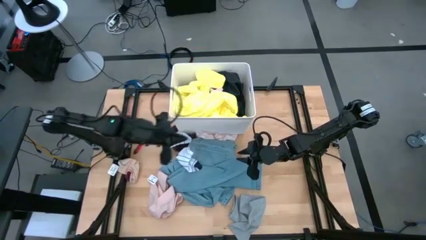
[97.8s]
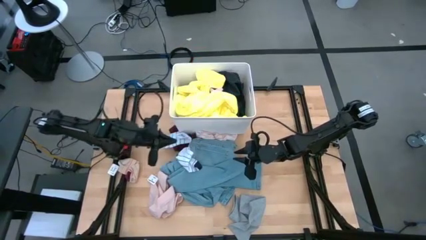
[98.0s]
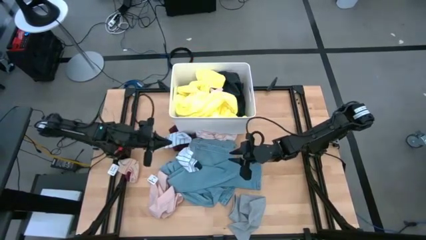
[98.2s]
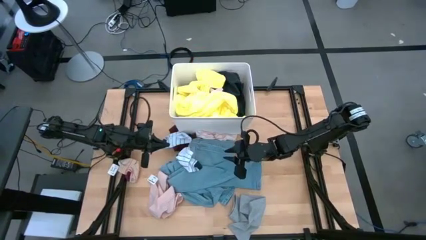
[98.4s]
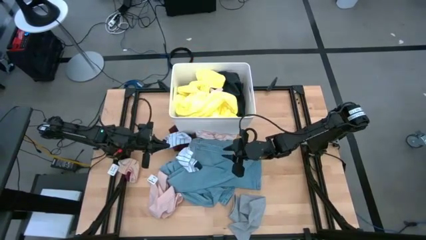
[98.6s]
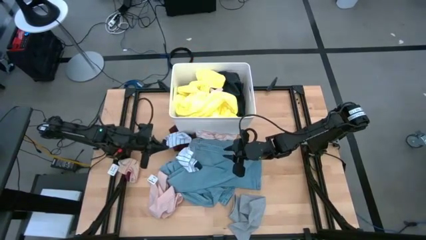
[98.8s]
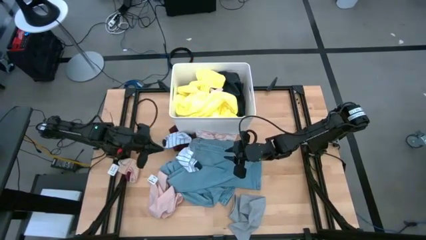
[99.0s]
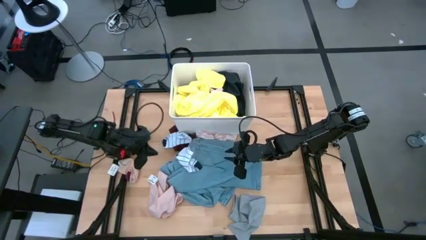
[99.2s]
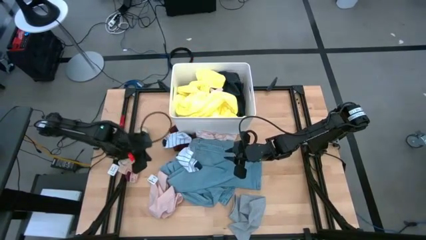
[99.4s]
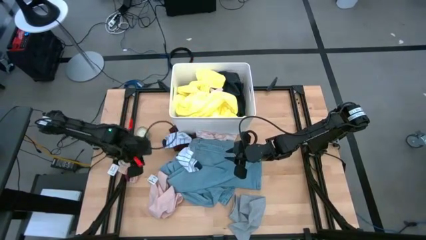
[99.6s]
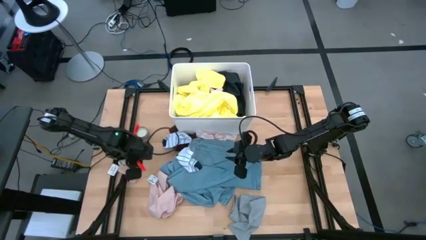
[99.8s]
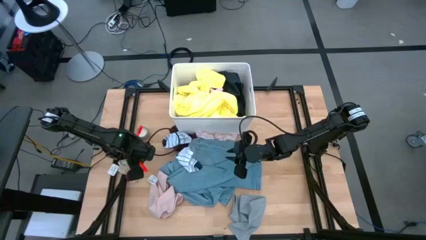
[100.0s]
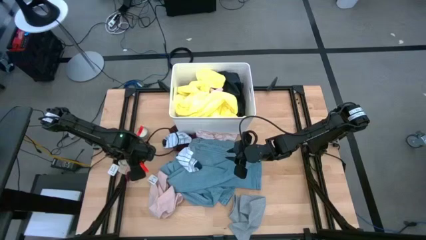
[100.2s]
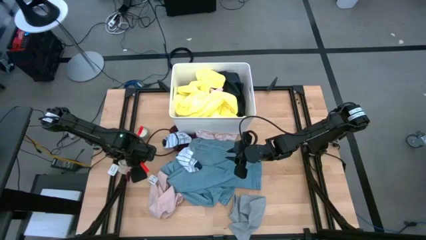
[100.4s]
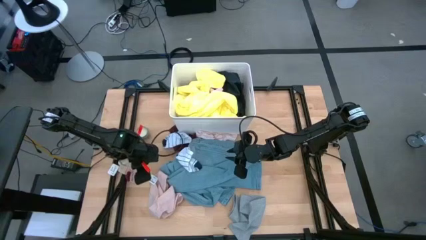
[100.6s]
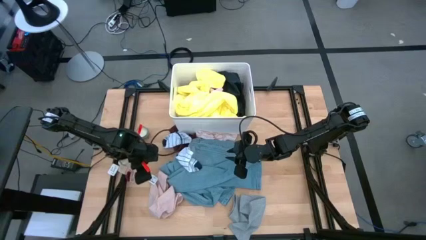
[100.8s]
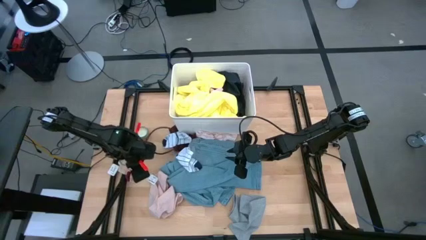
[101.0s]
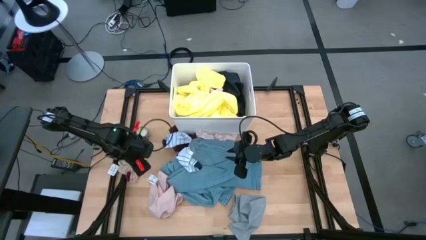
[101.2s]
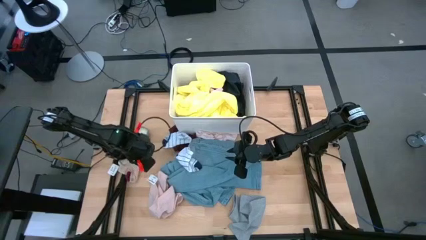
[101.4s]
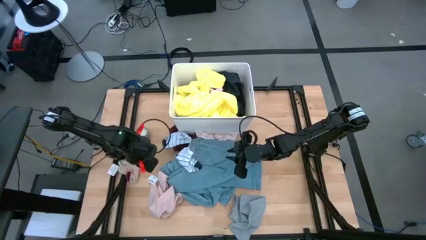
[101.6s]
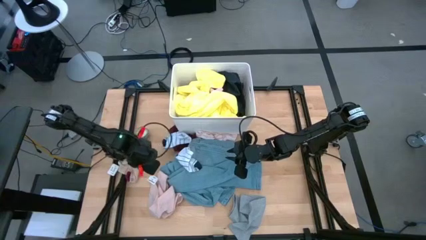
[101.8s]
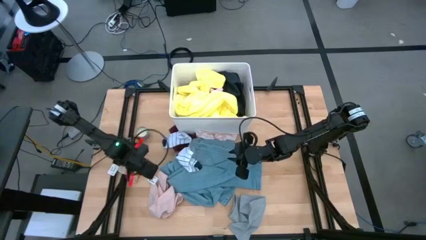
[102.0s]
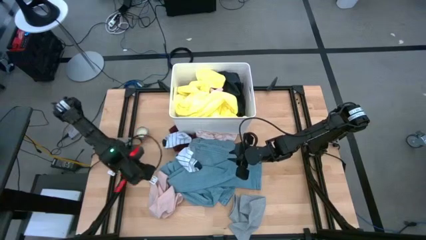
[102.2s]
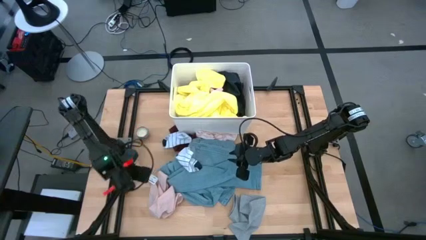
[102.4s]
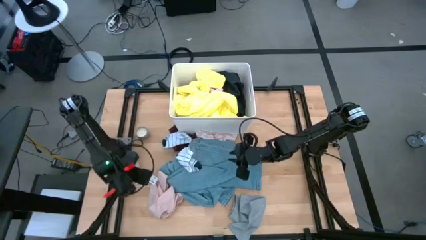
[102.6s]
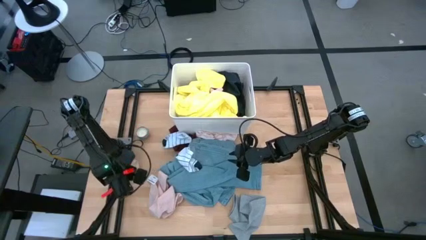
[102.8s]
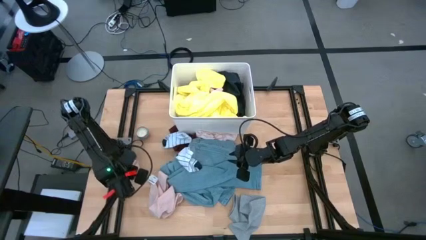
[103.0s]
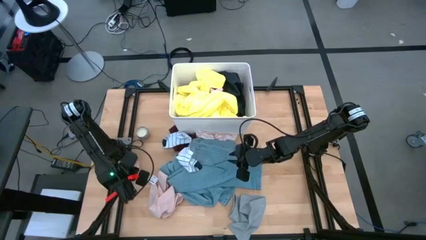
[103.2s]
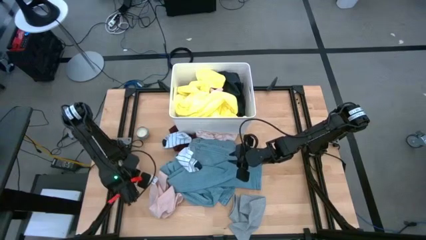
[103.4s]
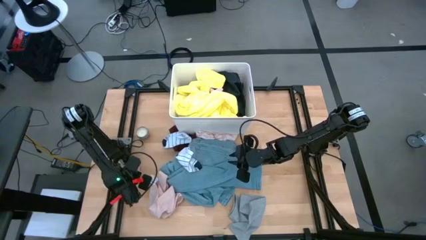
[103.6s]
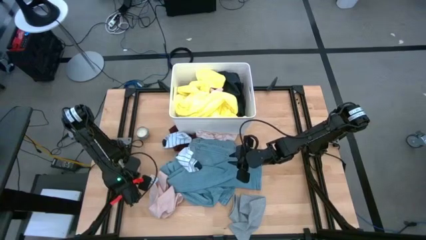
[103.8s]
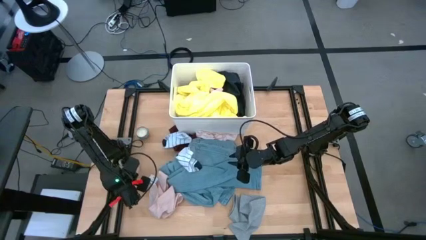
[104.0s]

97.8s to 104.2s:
Task: Sort clothes
Put the red striped sock into the white laundry bin

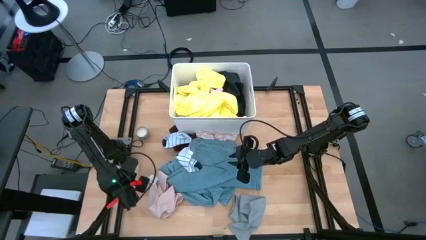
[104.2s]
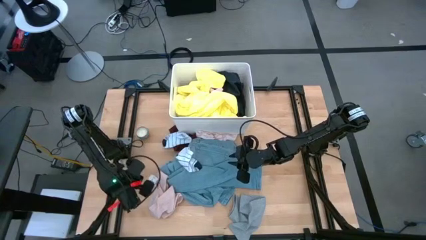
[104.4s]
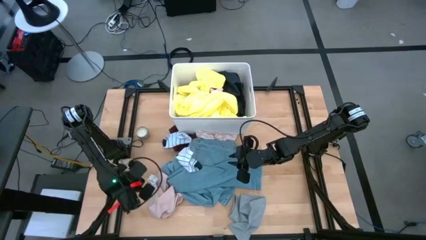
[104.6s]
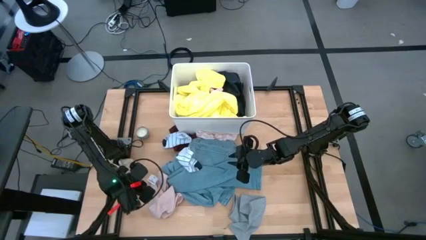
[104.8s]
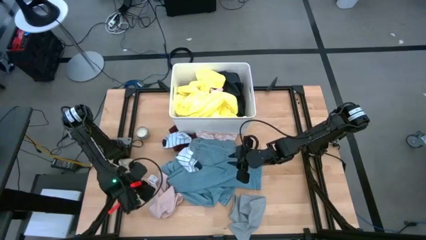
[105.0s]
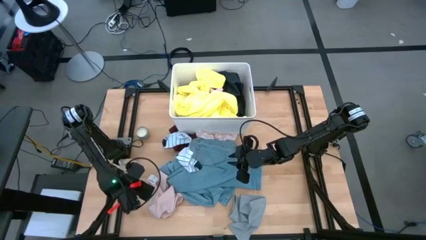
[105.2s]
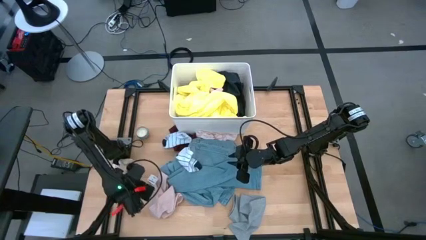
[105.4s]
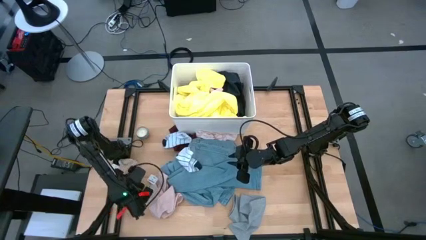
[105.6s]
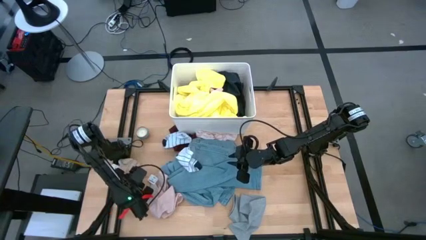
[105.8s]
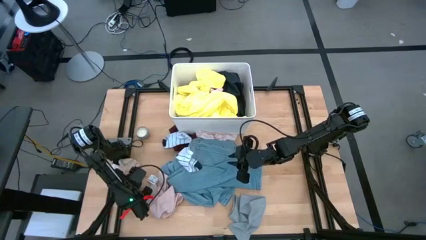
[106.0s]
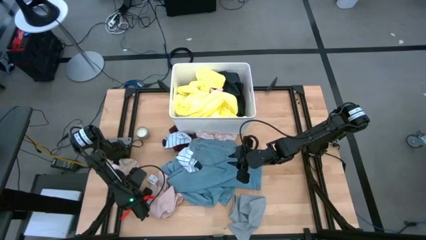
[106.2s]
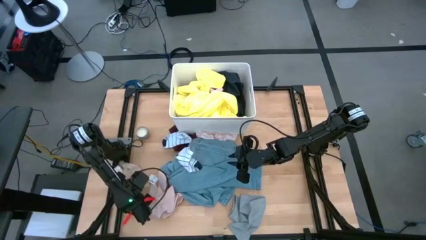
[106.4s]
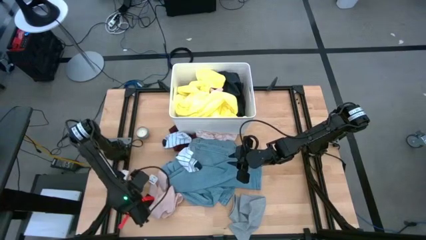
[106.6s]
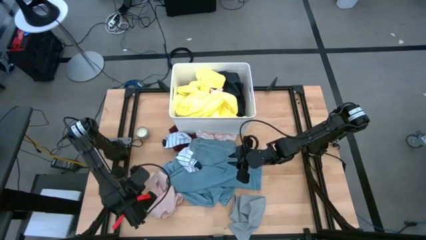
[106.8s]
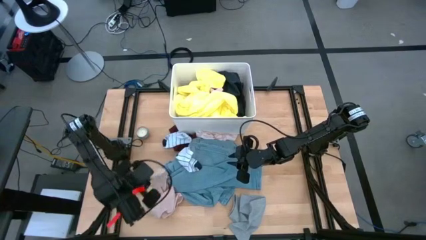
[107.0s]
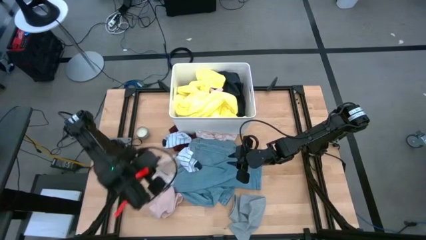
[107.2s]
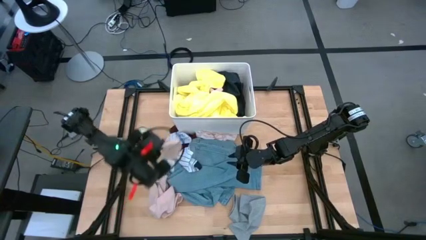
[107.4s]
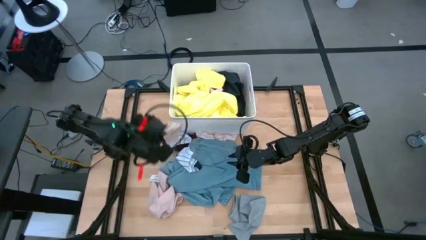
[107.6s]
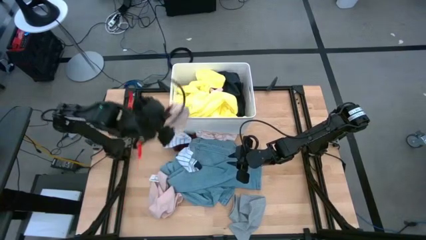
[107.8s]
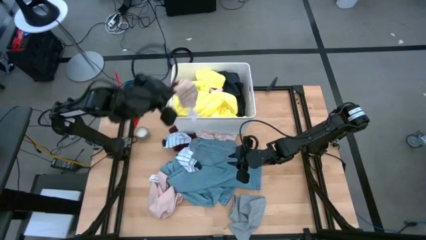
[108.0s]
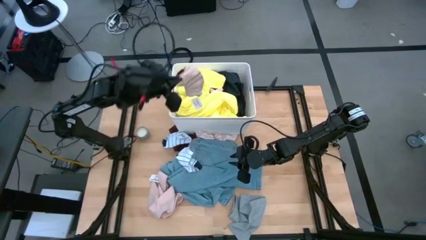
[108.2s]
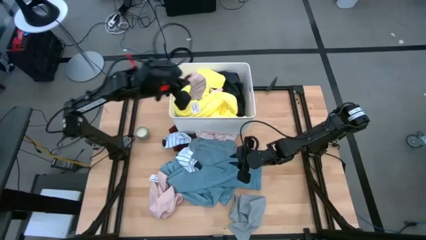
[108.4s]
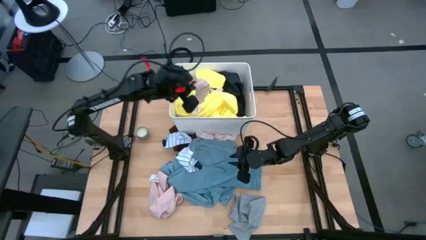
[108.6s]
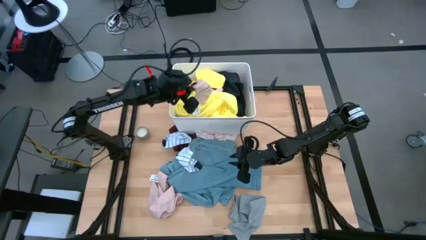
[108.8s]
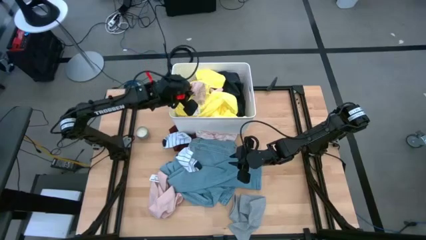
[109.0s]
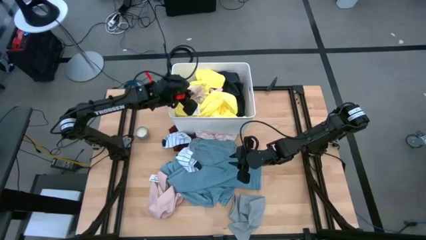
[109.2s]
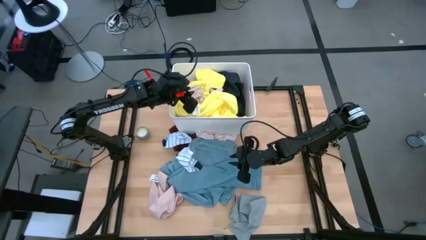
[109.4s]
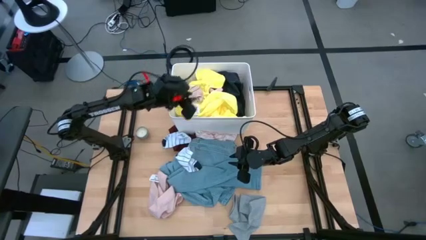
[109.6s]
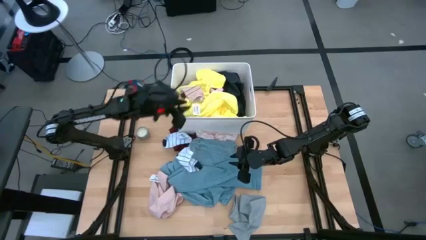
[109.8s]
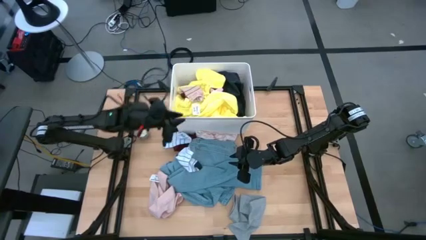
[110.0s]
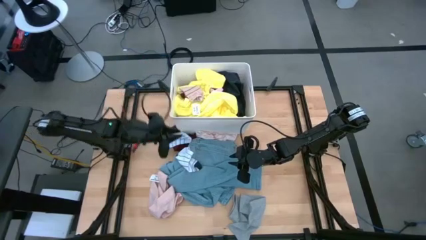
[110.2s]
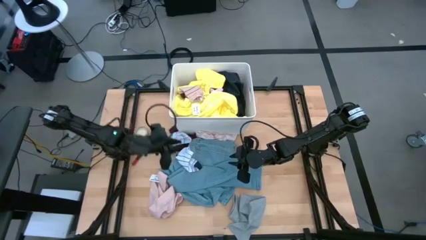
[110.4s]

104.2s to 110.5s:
Put the red striped sock into the white laundry bin

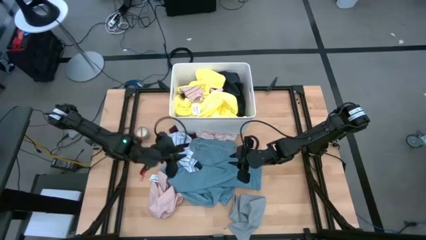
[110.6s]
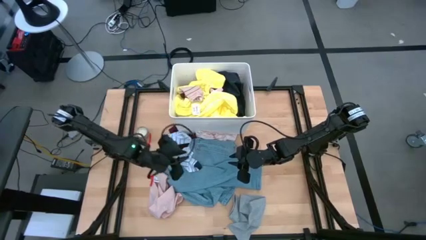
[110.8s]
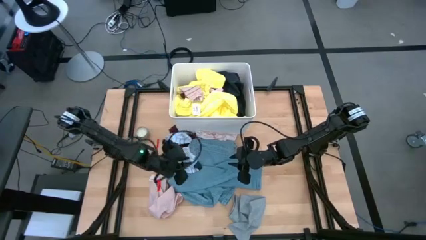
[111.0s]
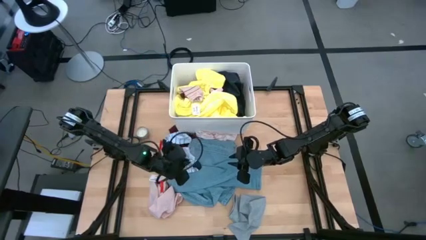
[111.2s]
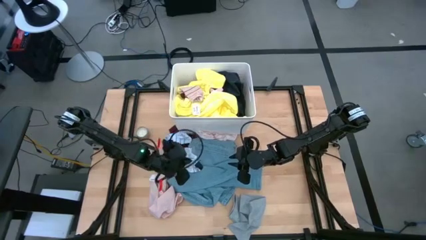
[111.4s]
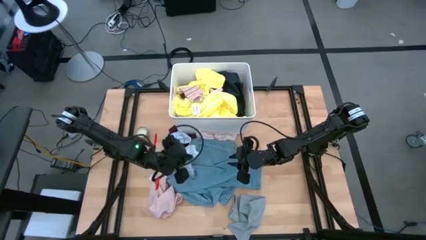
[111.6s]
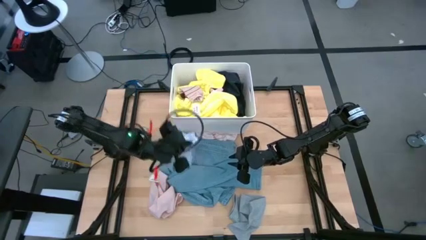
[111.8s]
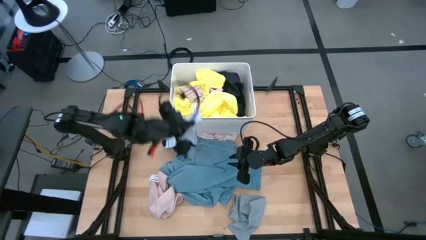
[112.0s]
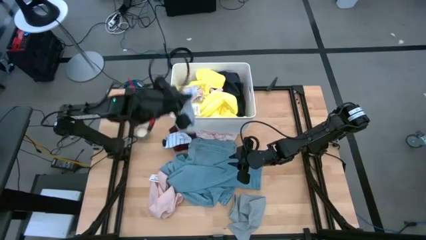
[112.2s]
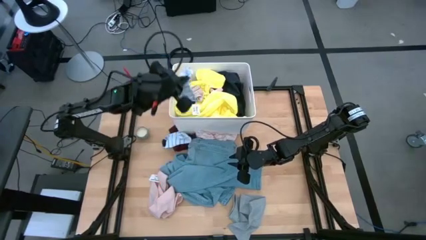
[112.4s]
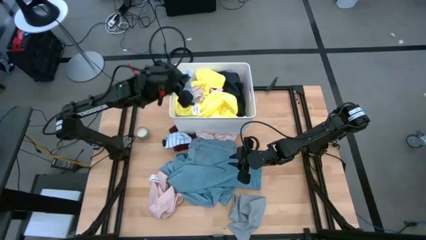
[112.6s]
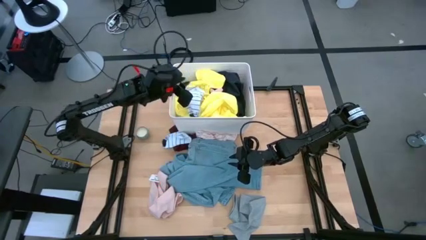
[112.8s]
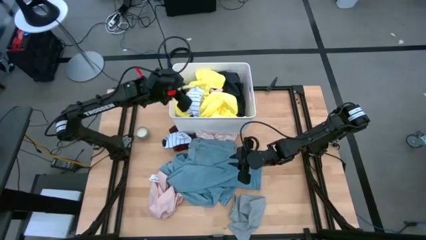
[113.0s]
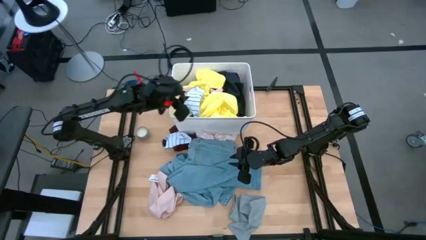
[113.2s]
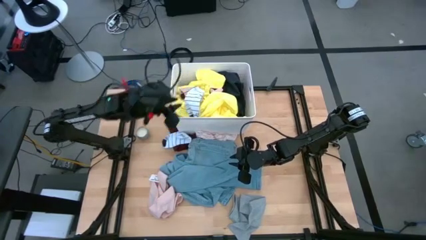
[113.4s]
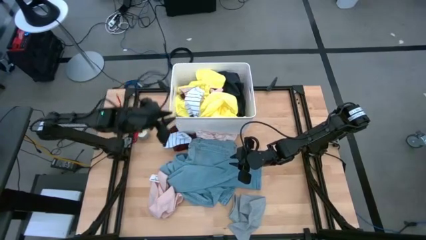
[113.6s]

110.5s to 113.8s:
Put the bottom blue striped sock into the white laundry bin
